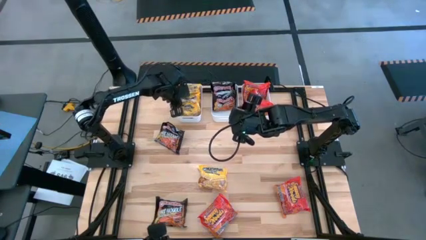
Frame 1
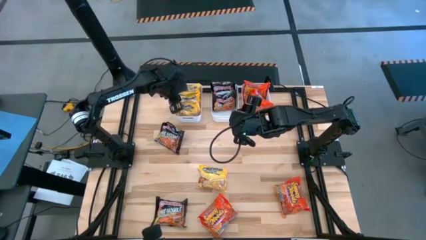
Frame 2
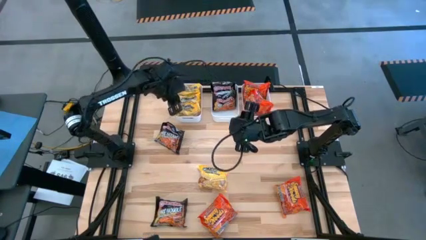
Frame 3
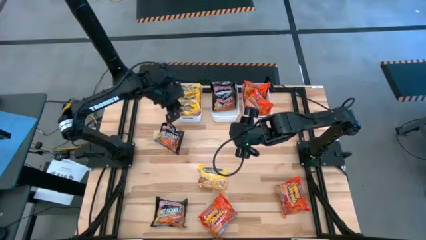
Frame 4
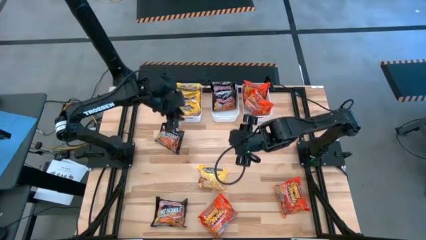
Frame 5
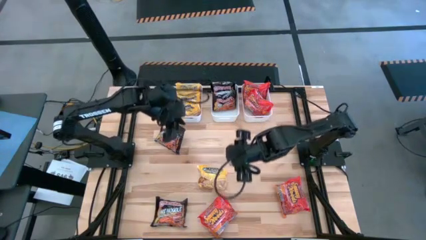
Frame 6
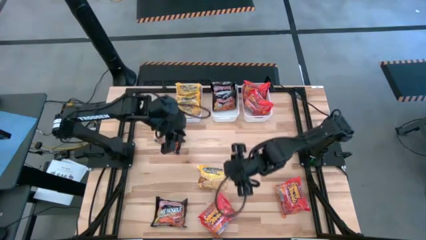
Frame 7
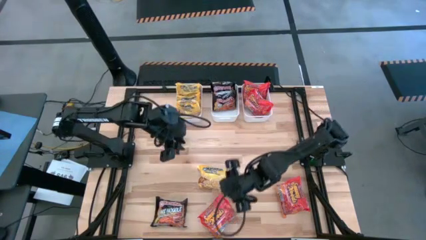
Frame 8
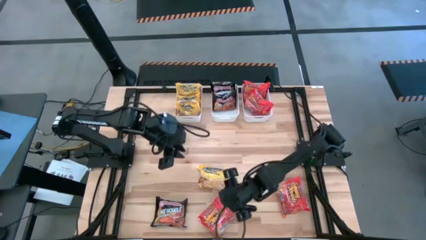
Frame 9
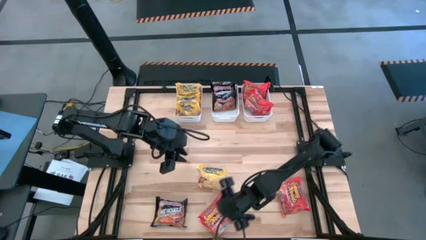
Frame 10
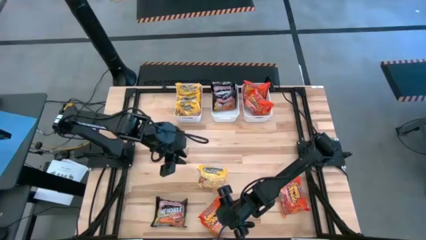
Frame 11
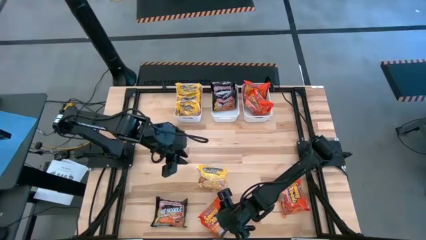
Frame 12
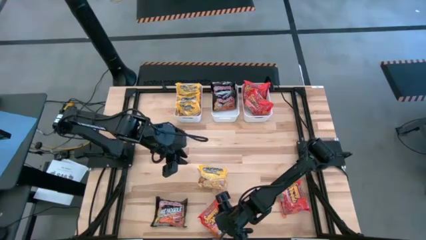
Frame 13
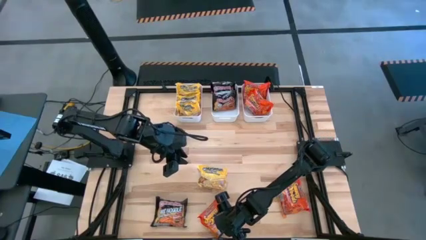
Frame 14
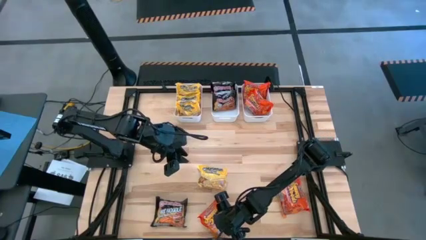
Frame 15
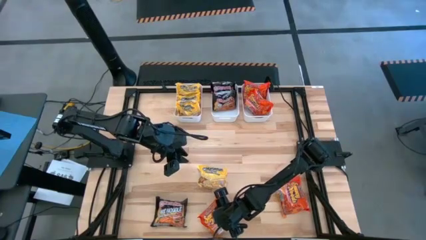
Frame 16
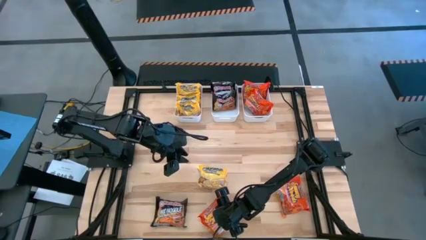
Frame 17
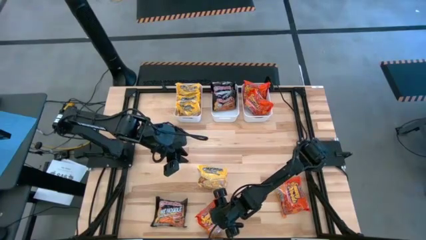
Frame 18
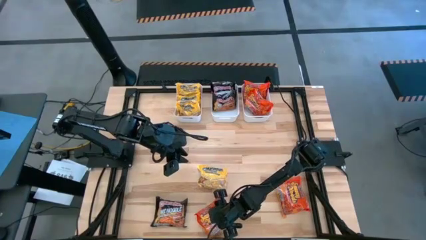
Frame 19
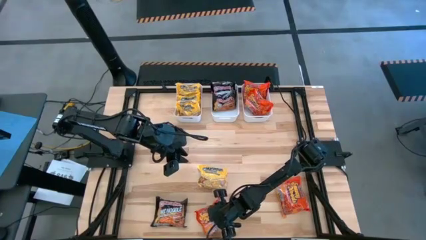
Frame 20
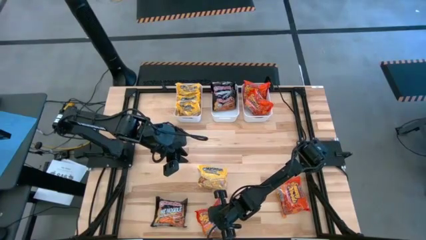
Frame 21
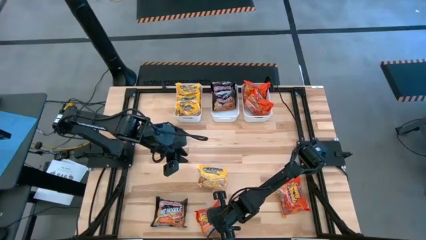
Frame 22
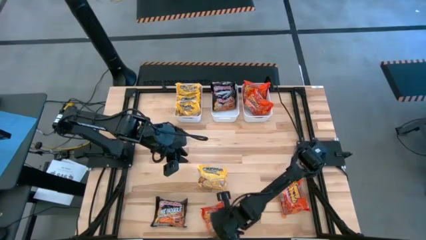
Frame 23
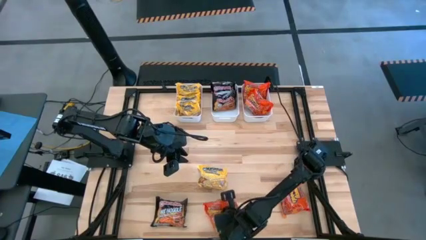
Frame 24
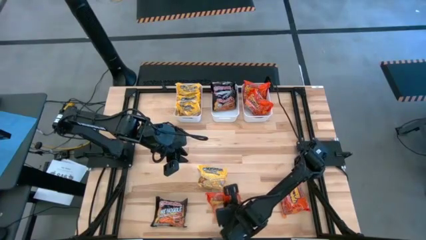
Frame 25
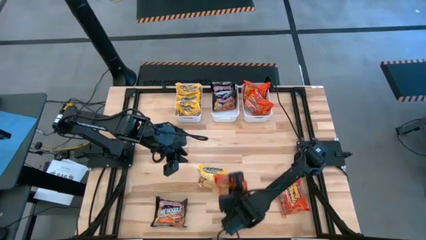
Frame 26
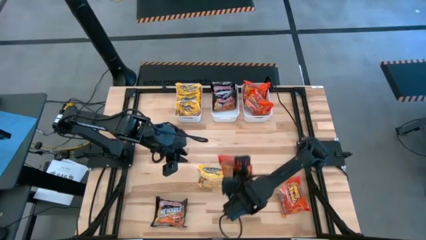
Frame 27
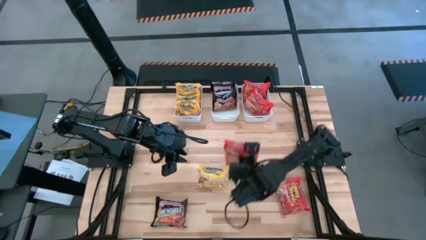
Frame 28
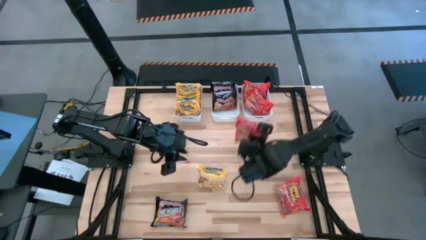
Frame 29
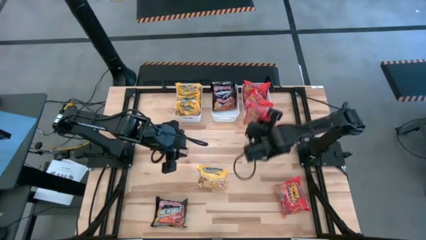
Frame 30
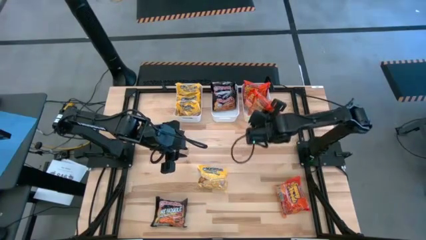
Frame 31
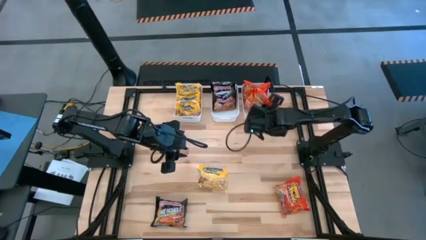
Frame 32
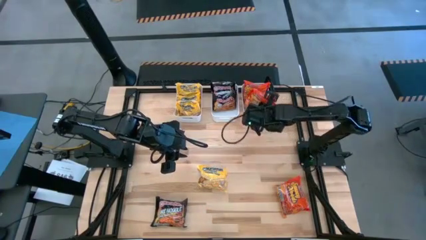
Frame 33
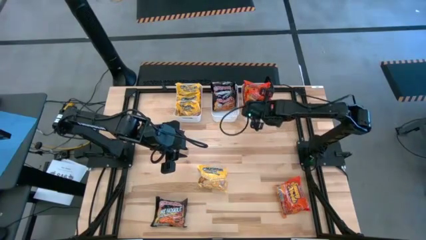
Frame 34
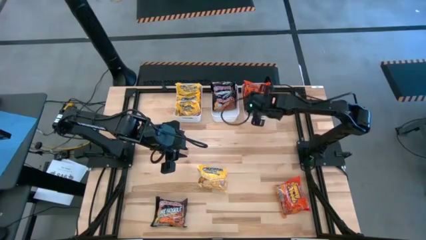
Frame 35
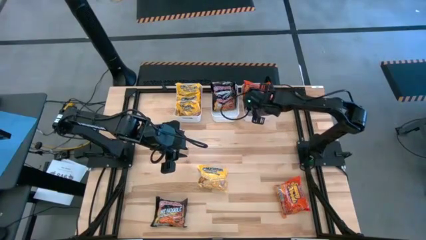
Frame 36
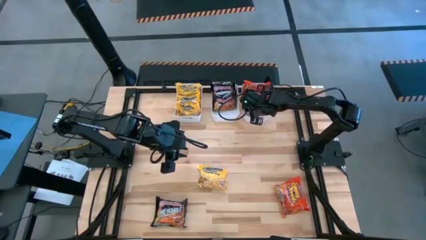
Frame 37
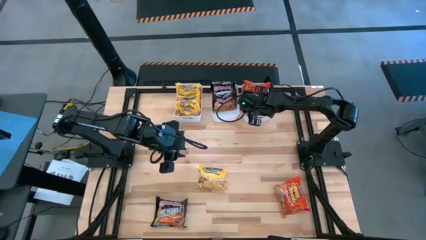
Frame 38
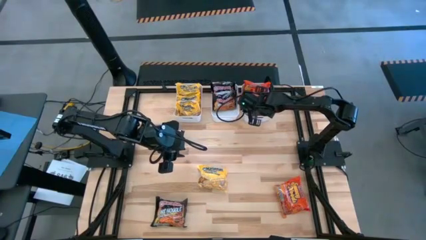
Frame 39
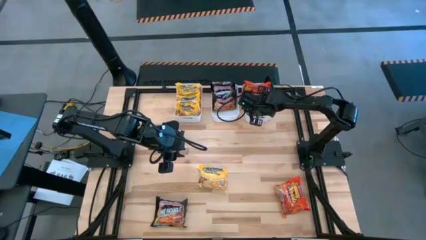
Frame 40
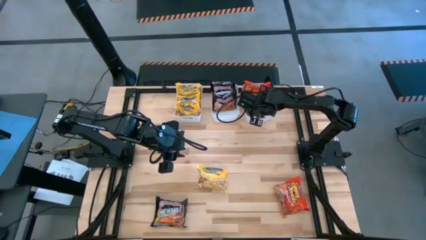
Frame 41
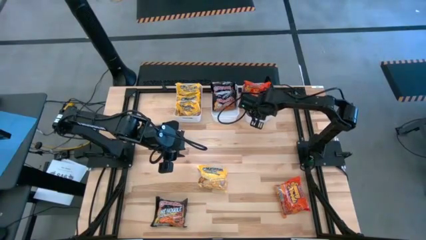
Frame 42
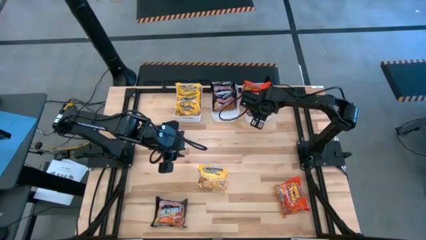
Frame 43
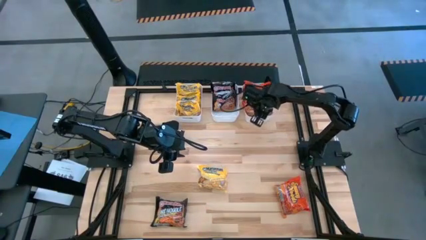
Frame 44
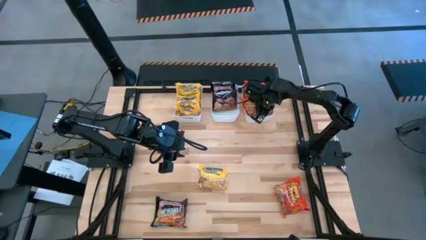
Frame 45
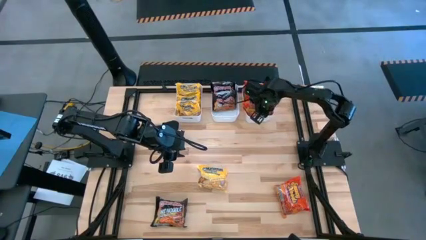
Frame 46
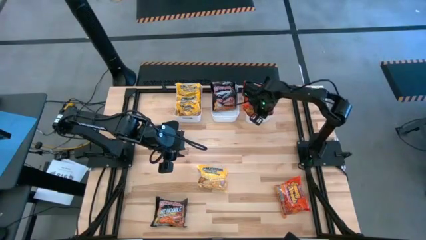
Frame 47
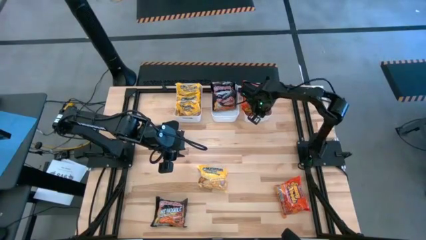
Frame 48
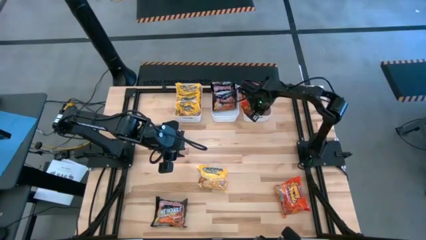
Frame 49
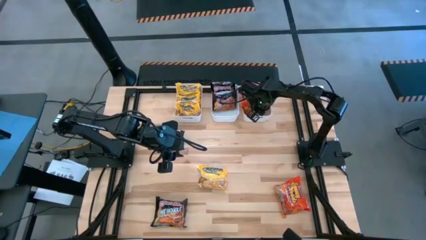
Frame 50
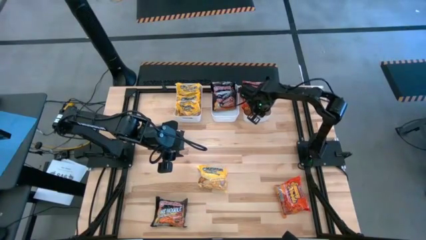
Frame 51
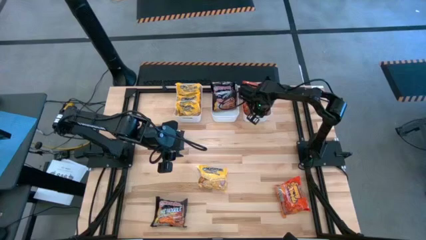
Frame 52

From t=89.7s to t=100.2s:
Task: Sort Maruchan noodles
Put the orange noodle pack into the right white bin

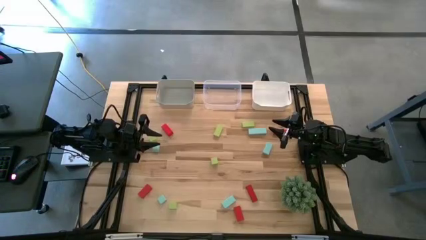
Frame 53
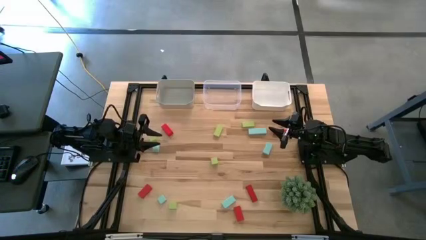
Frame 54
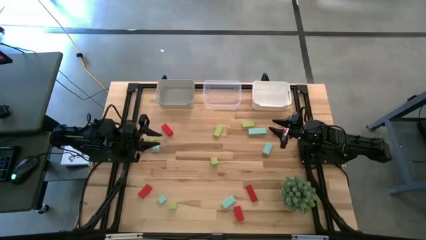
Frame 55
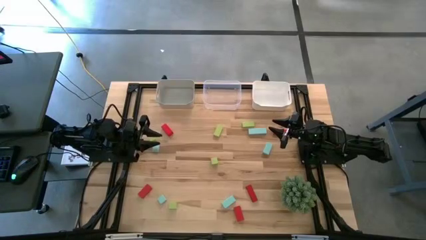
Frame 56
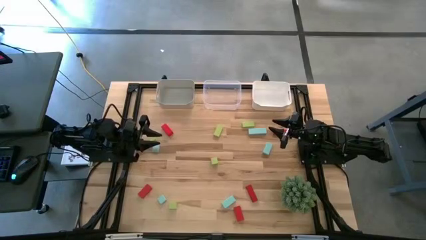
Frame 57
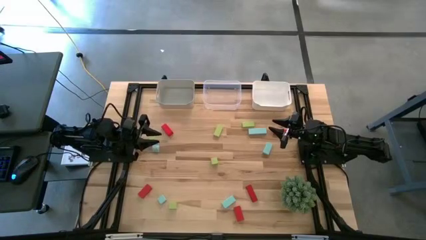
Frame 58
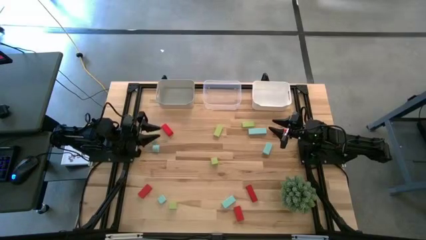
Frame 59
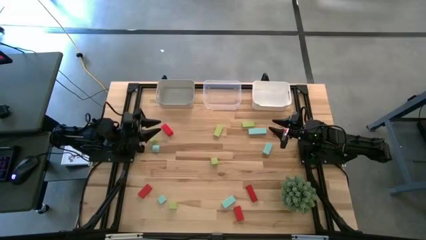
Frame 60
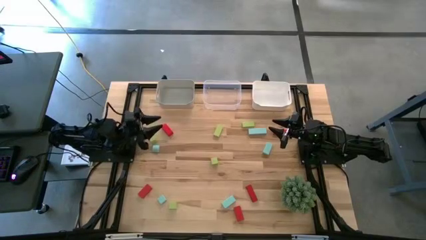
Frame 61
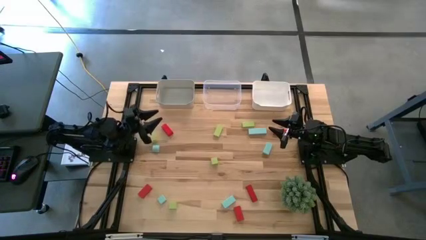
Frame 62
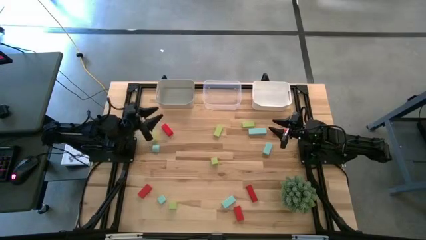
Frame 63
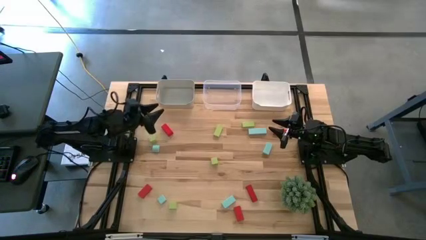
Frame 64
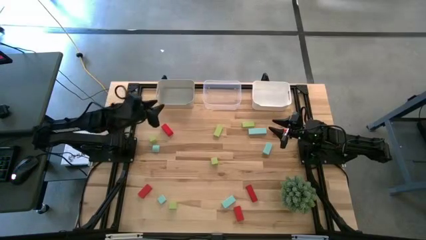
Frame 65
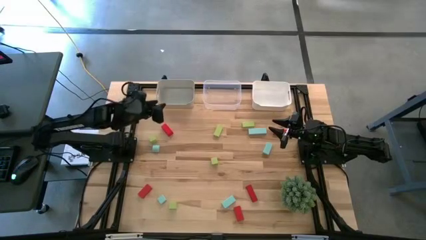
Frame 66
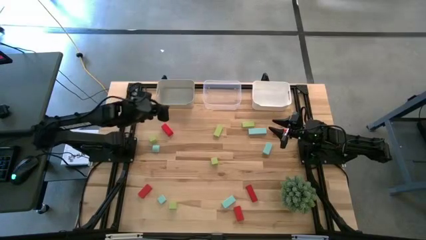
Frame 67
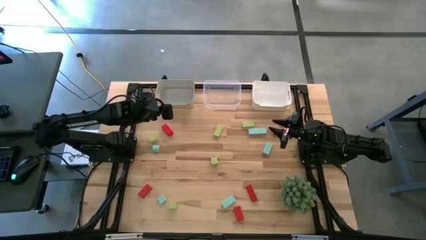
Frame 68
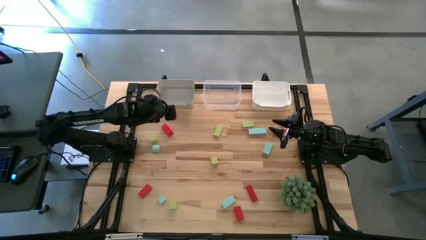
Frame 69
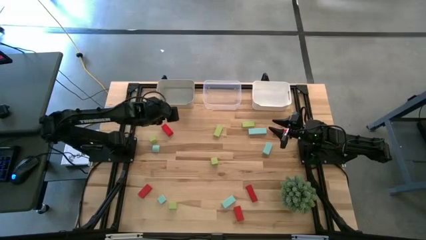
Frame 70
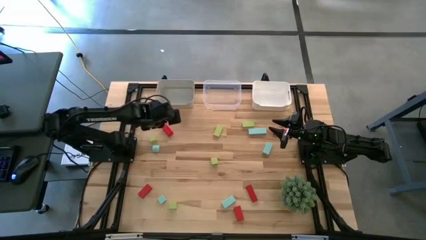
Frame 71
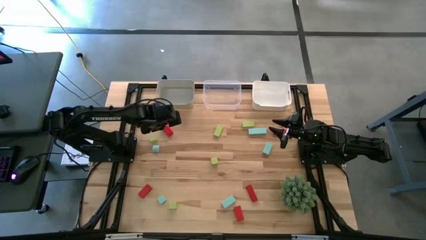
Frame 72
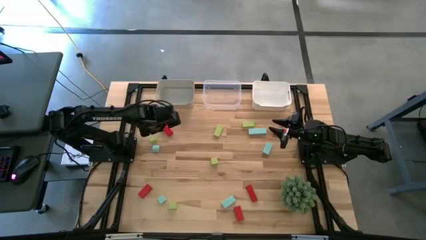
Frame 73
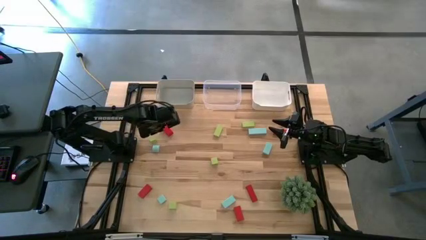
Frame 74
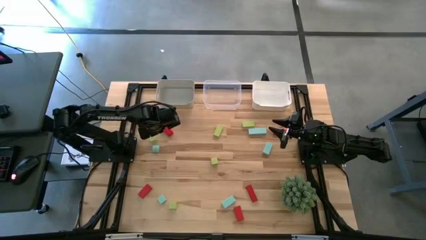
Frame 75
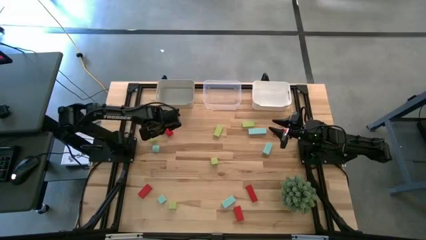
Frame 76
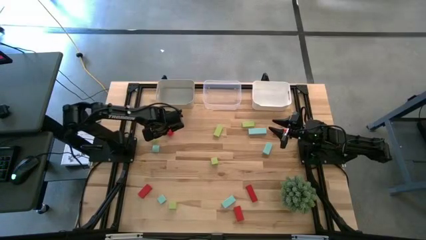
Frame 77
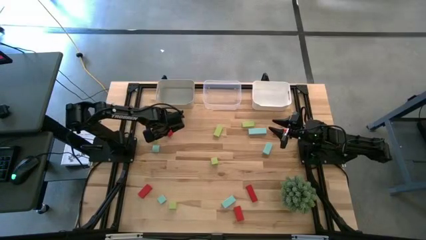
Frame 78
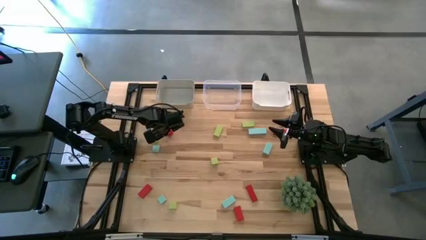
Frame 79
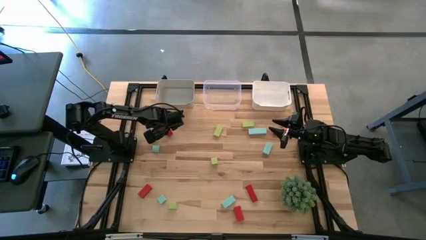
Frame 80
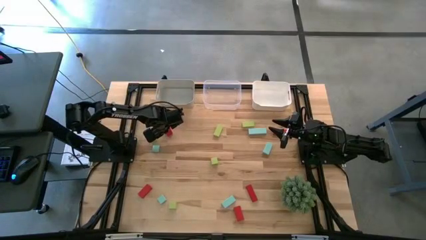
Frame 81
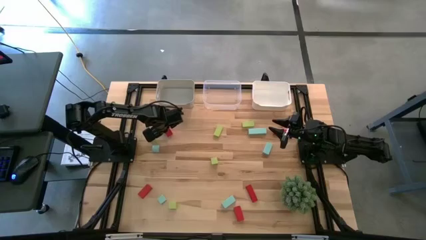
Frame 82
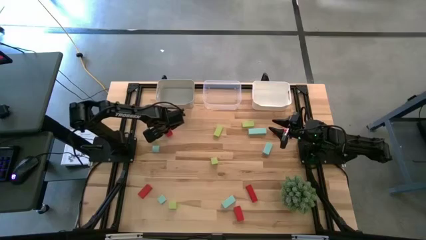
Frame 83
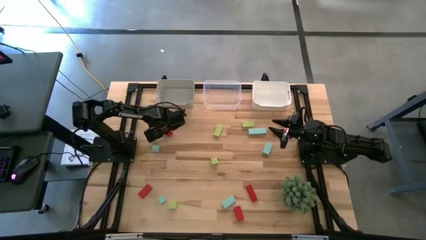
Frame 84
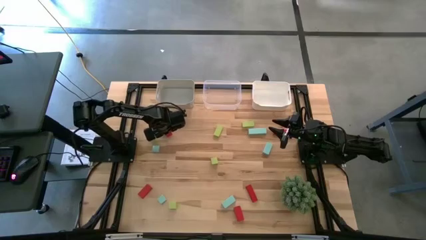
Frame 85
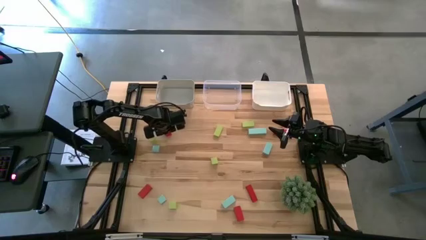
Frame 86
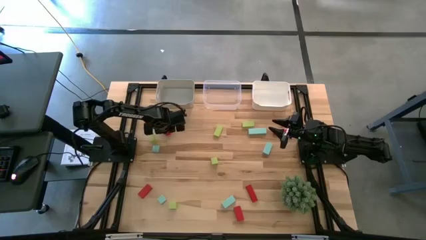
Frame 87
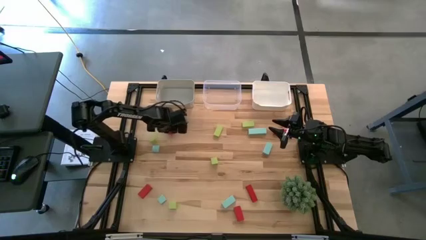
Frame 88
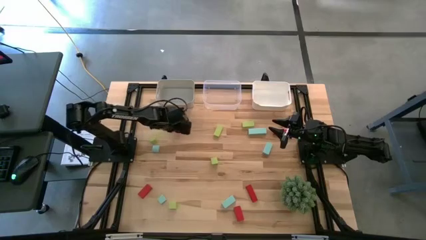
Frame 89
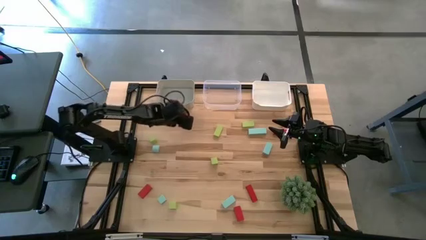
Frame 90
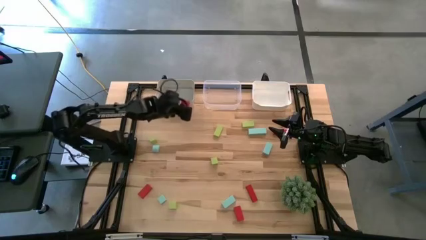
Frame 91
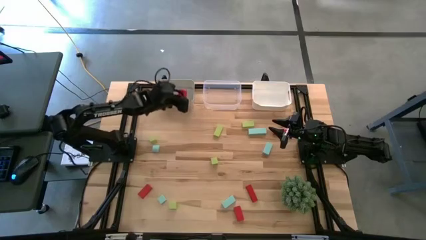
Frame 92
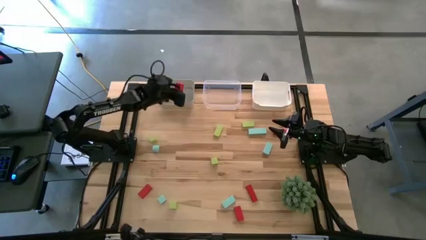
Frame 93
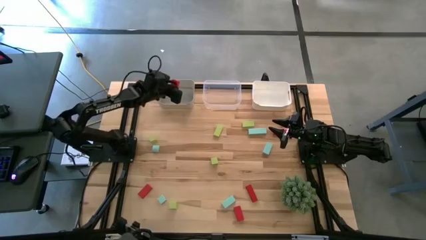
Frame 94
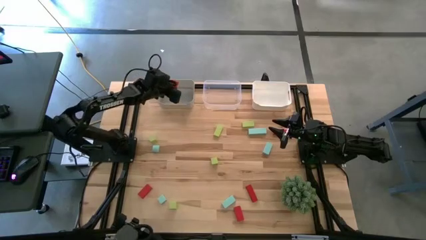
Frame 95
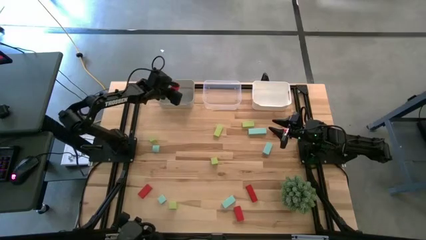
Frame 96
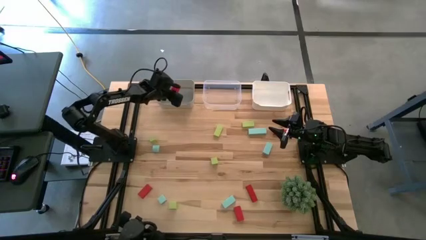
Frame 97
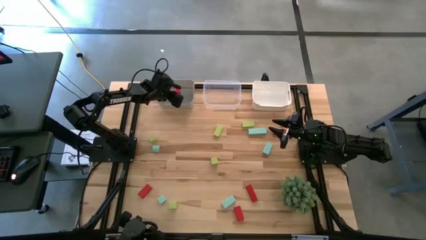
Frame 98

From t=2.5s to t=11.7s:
Task: Sort & place blocks by color
Put the red block into the gray bin
